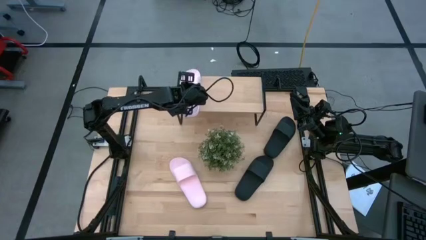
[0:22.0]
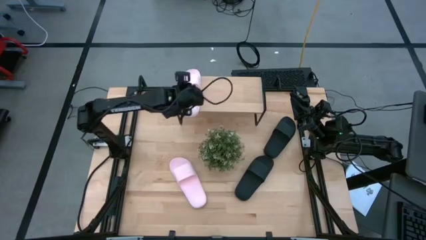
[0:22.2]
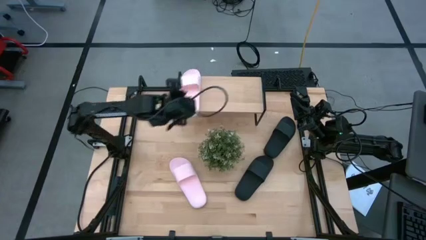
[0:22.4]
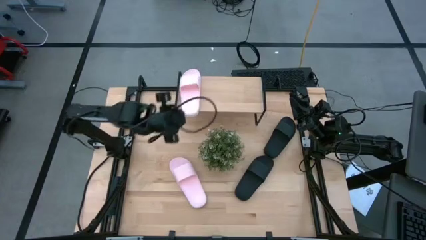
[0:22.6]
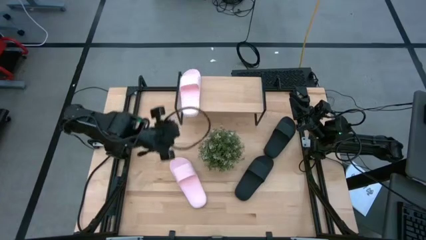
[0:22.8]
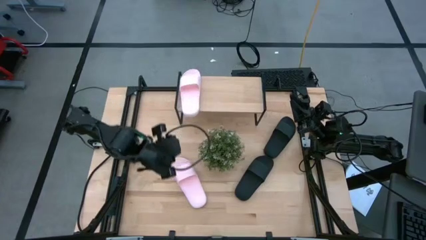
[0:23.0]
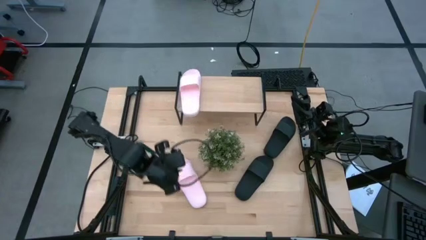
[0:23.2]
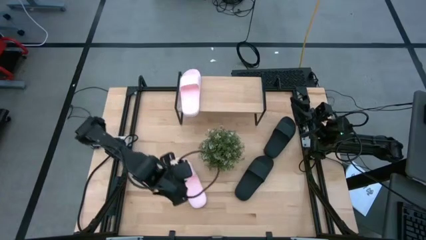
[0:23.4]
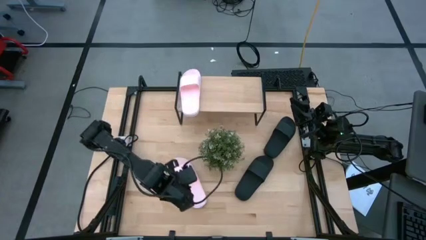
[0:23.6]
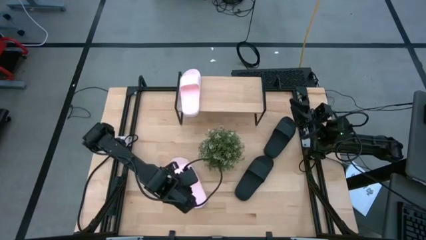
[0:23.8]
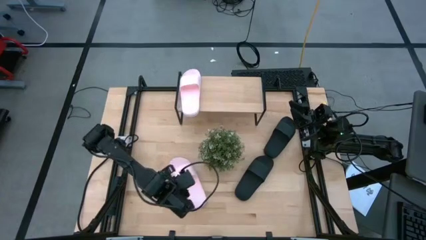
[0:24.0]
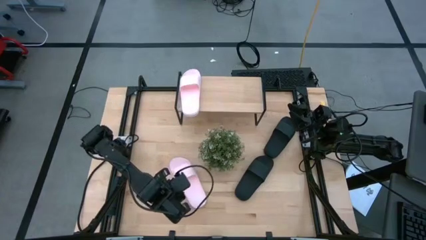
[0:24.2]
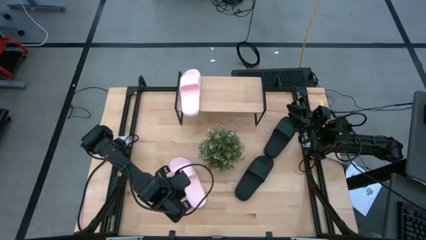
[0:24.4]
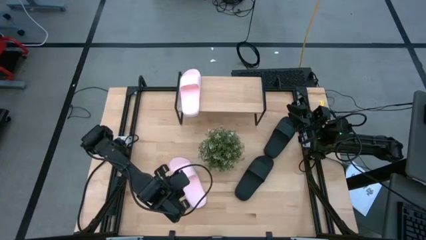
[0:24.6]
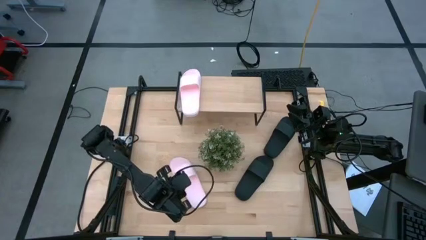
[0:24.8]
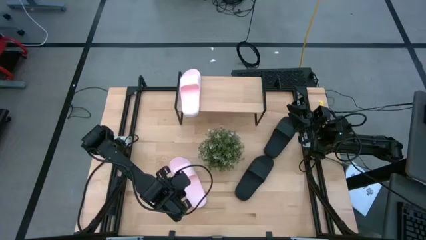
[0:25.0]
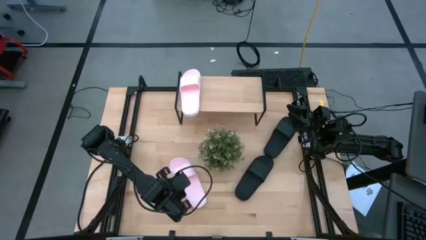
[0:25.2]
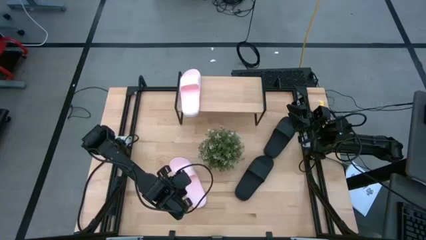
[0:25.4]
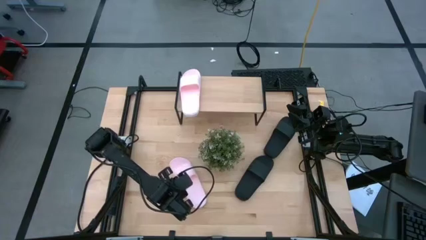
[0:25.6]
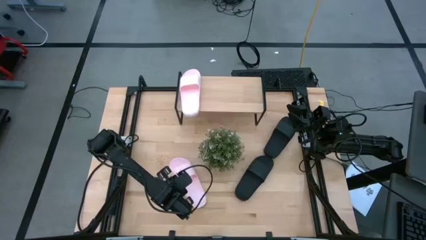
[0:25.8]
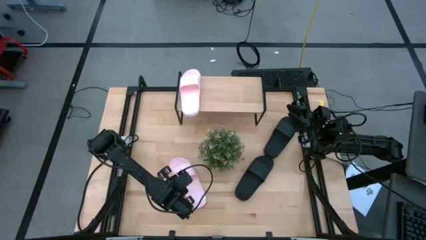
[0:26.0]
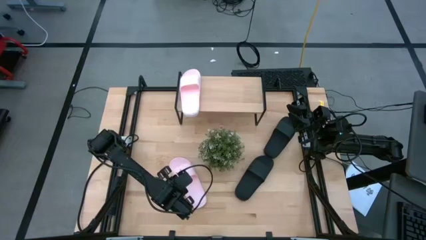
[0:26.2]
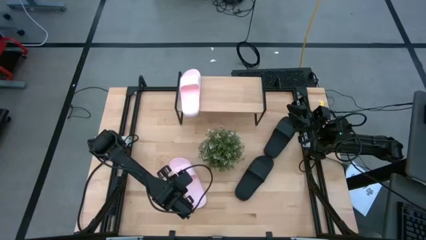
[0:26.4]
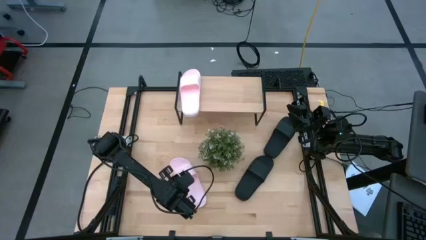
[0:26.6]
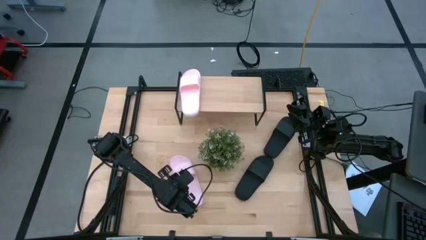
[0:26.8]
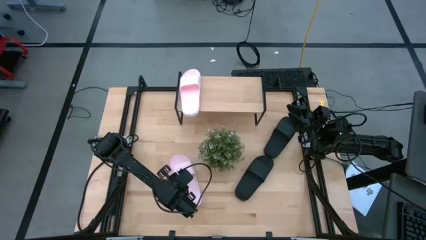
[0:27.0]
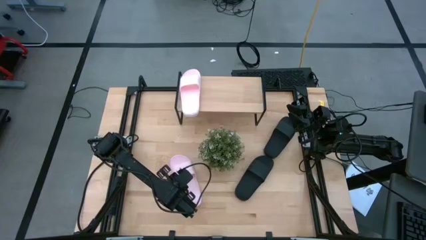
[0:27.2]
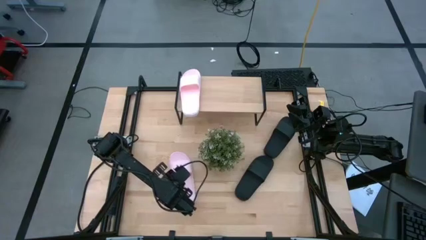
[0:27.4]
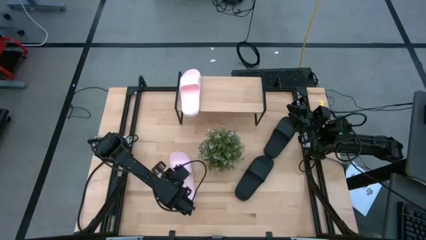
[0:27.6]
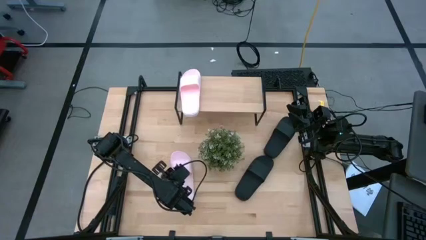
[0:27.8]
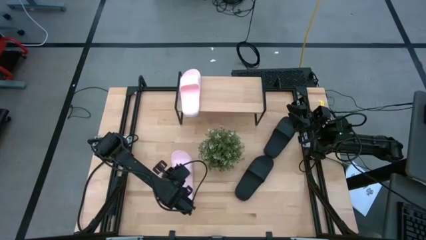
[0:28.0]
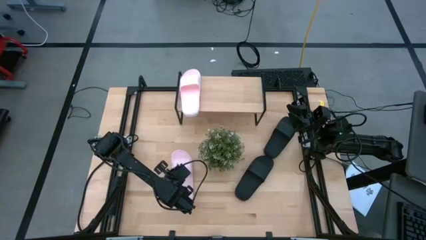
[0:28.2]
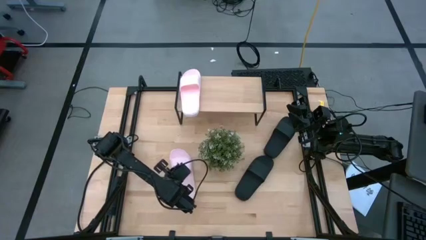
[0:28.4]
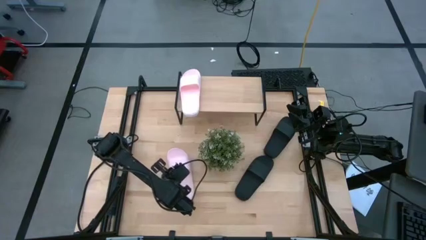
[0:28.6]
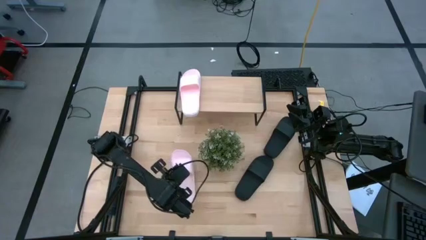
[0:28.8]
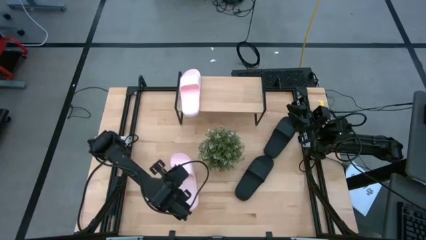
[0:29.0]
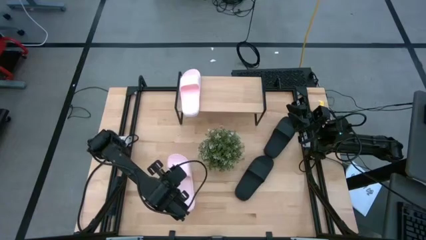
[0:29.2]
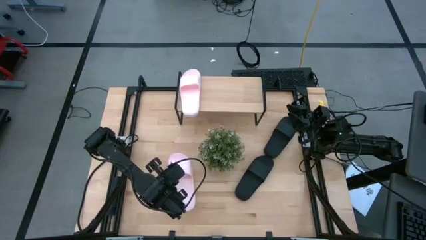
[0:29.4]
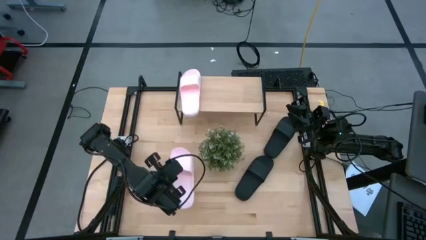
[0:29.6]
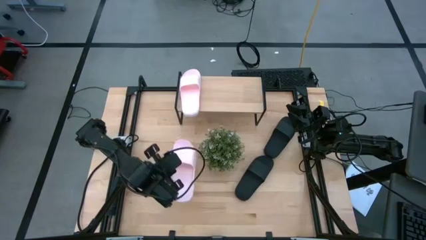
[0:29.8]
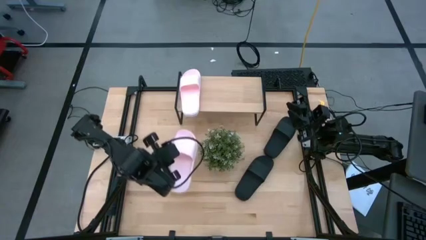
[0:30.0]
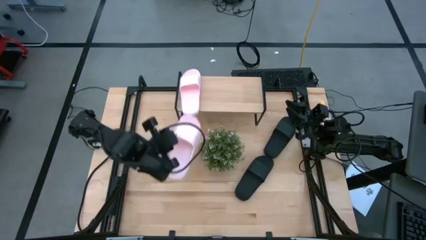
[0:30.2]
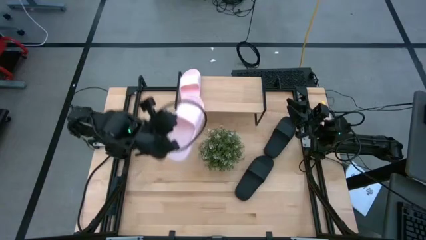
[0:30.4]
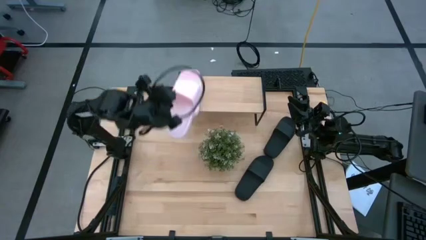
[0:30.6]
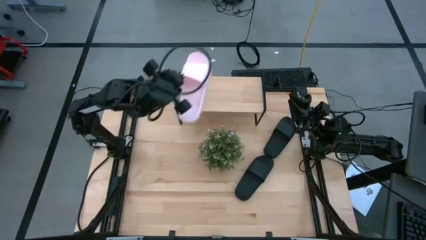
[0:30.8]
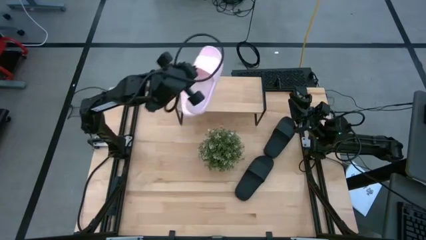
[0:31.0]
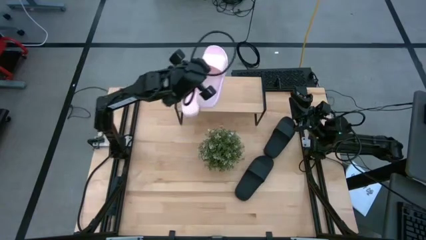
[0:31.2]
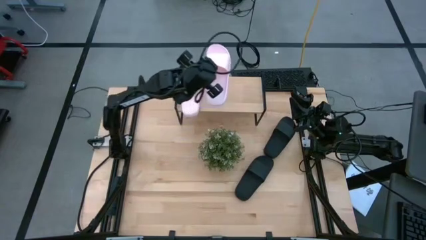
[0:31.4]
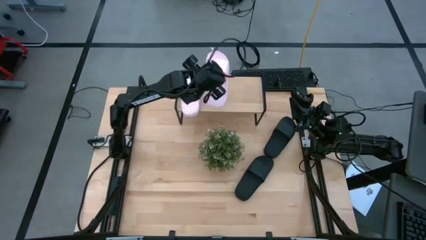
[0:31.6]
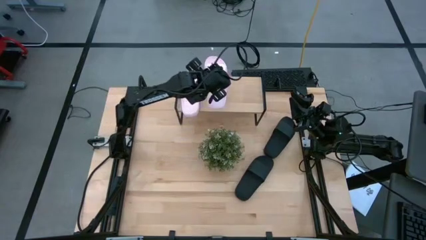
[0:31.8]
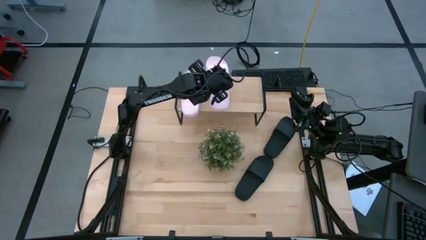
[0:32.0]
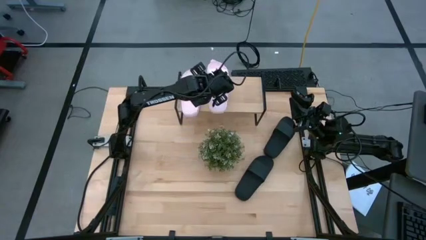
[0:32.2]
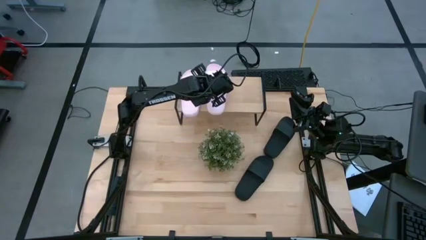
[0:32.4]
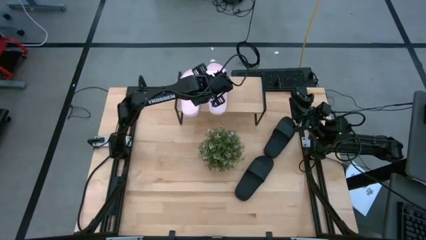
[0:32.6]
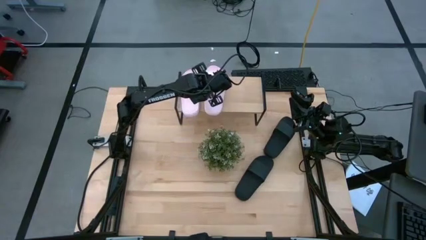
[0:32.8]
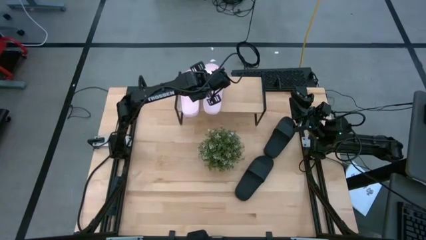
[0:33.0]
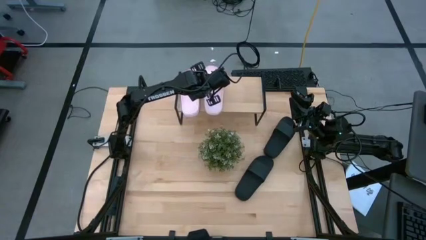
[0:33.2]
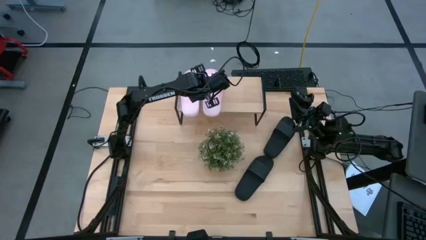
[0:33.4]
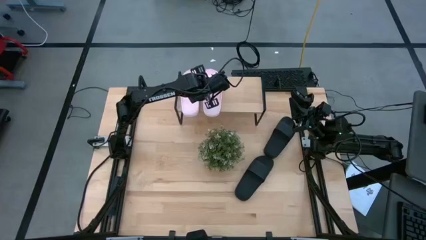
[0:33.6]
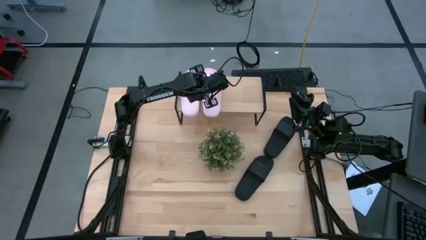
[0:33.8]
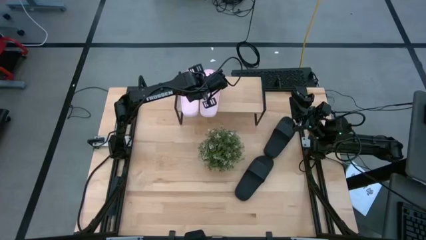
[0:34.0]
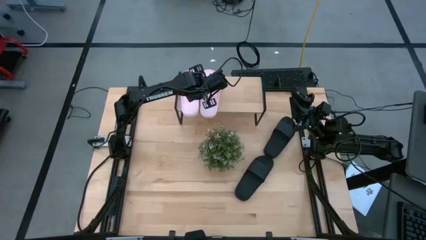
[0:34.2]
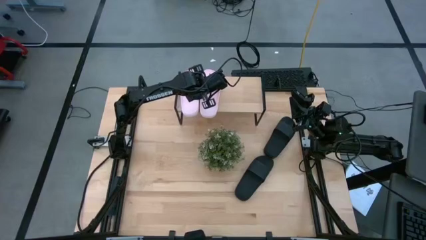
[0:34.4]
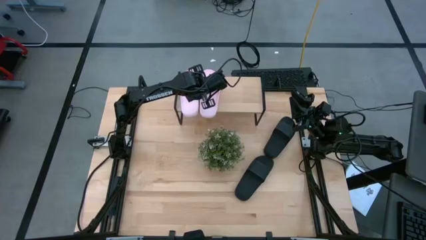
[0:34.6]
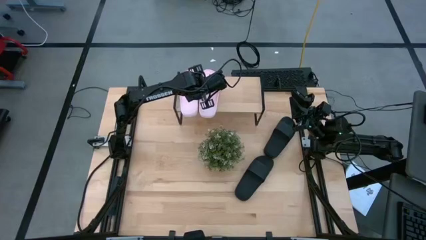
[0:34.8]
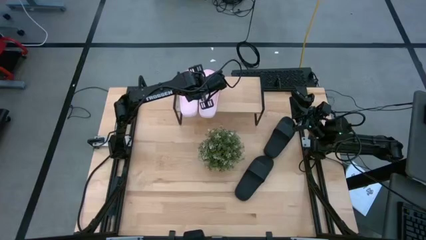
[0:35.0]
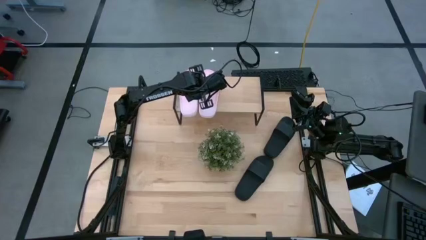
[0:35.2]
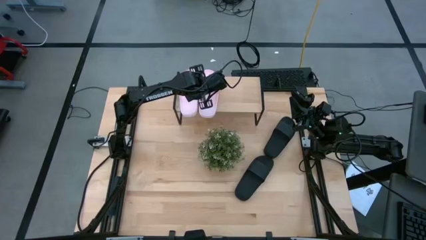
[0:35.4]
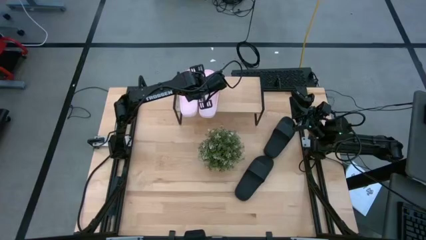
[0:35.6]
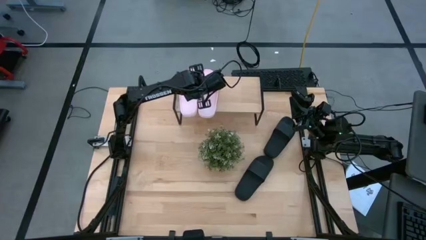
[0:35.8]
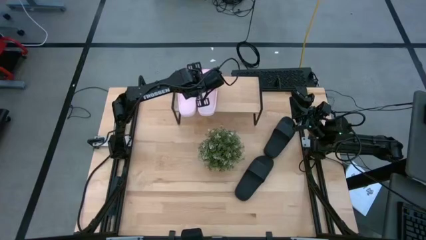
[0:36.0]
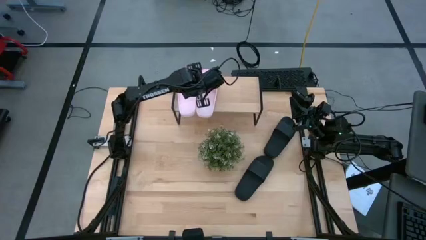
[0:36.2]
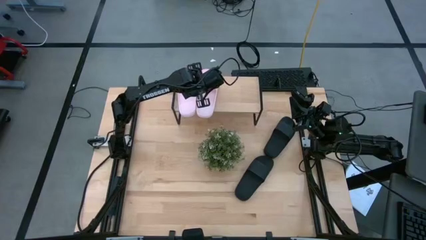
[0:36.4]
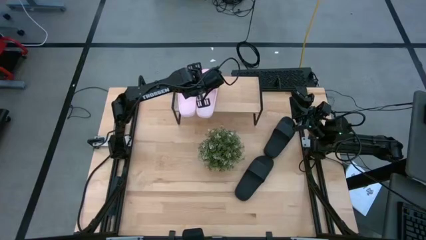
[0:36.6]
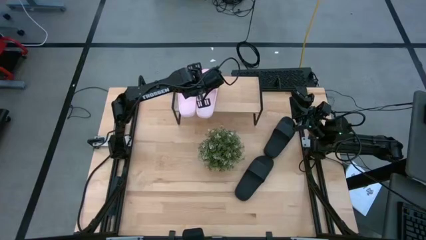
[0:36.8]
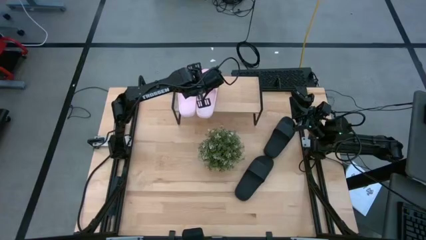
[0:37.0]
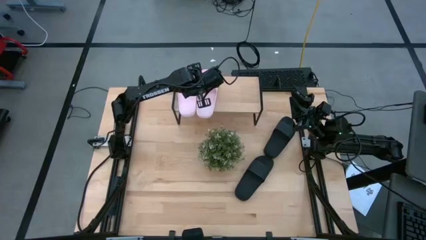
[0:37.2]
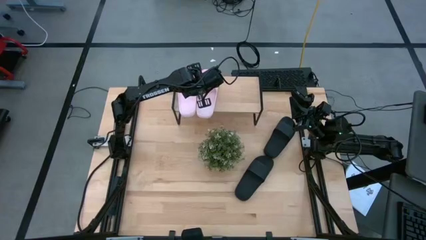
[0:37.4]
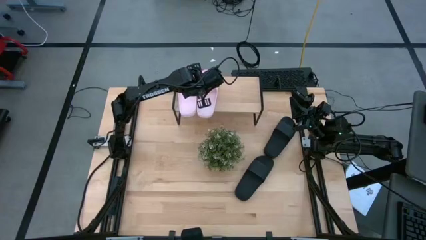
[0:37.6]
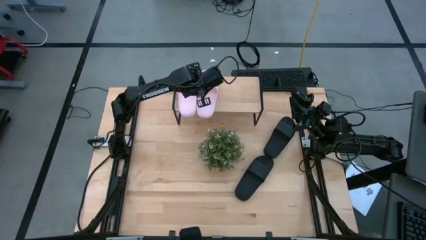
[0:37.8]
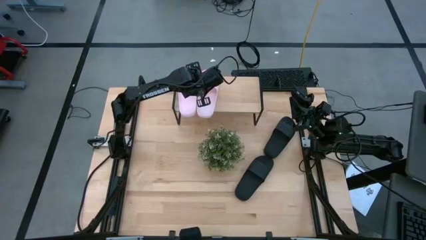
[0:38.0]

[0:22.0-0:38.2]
Task: Pick and place slides into the shelf
Put the pink slide on the shelf
